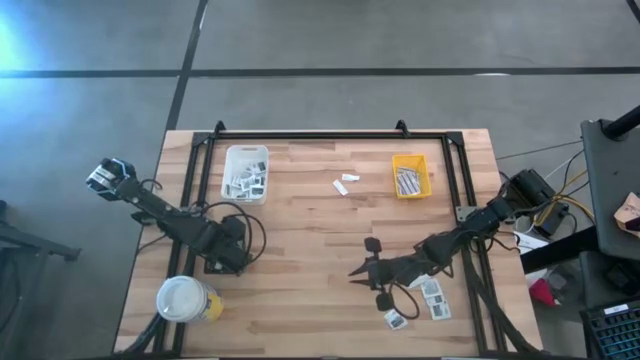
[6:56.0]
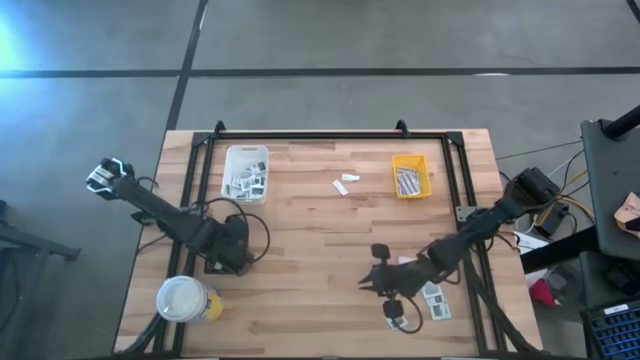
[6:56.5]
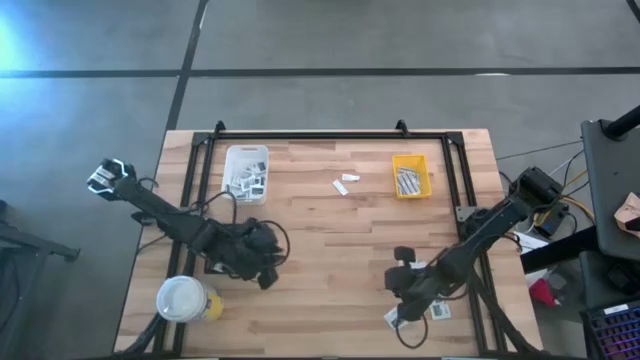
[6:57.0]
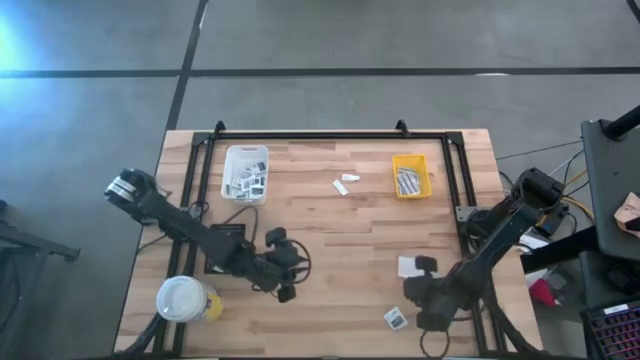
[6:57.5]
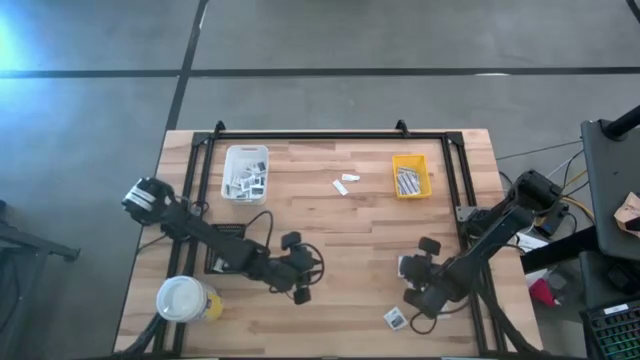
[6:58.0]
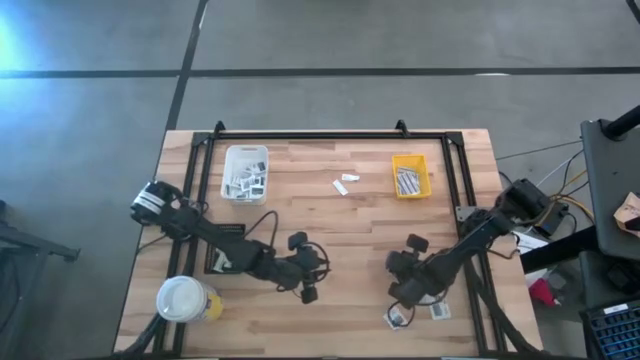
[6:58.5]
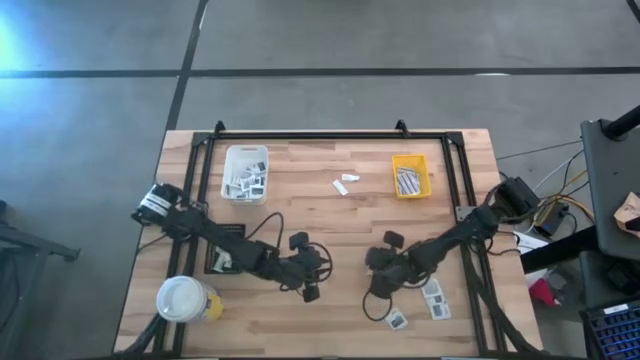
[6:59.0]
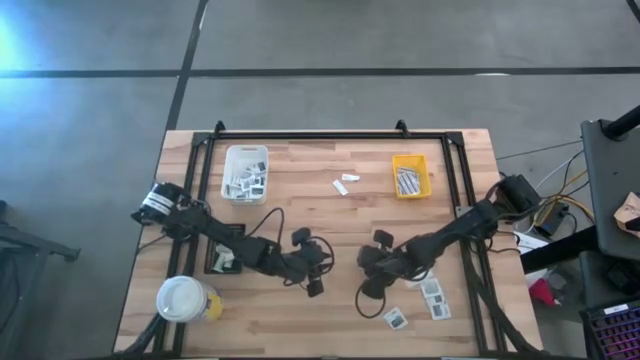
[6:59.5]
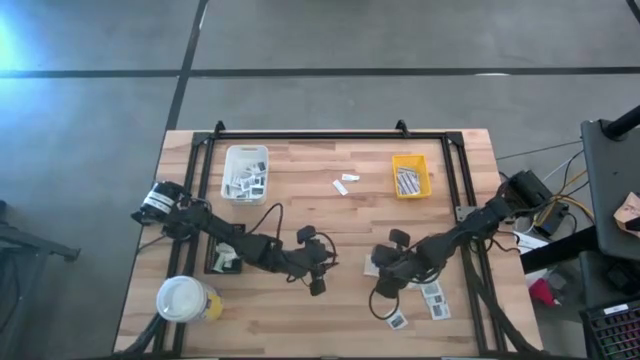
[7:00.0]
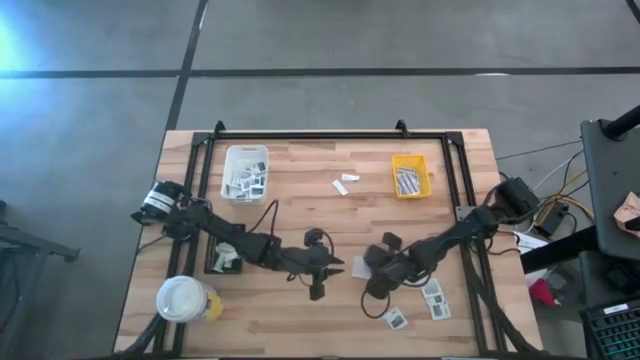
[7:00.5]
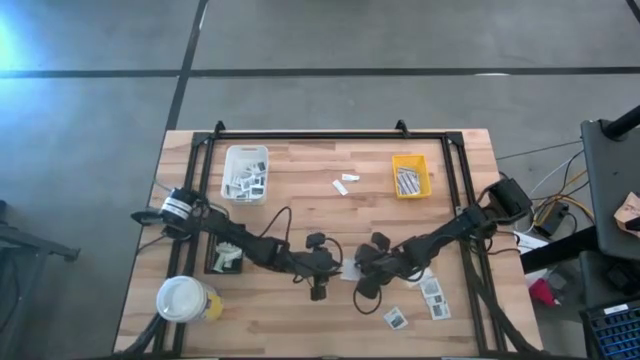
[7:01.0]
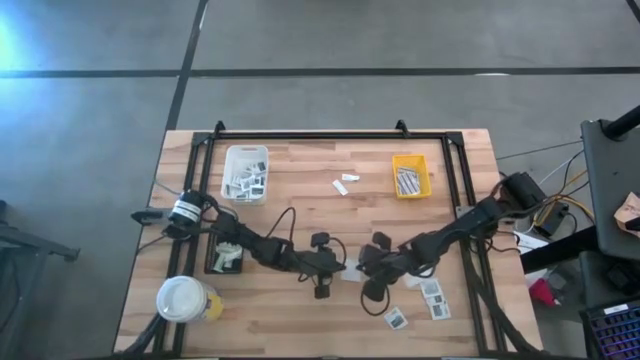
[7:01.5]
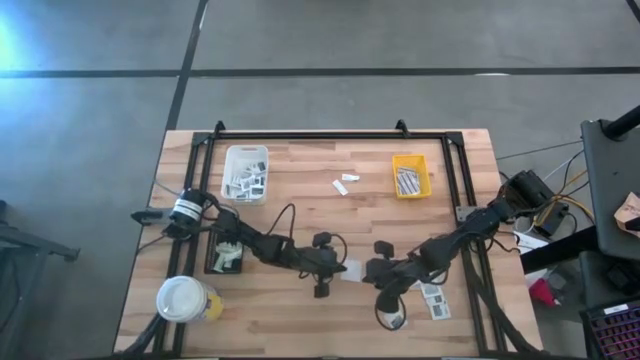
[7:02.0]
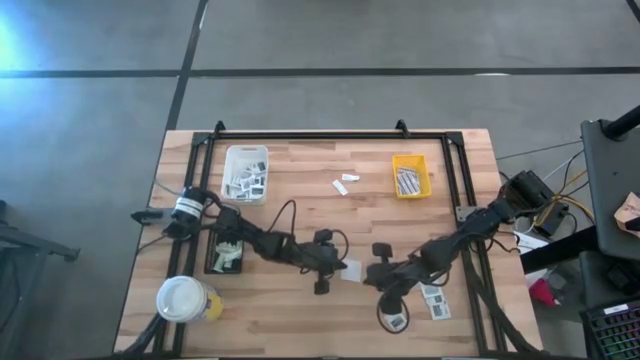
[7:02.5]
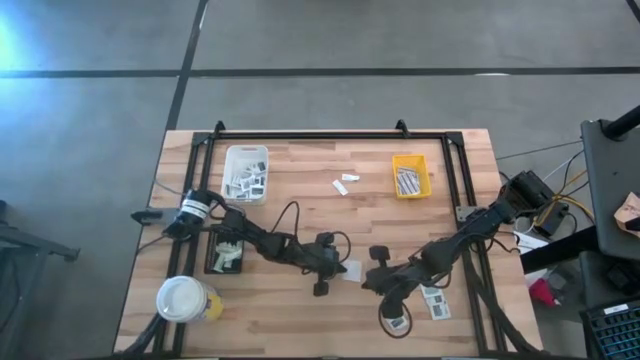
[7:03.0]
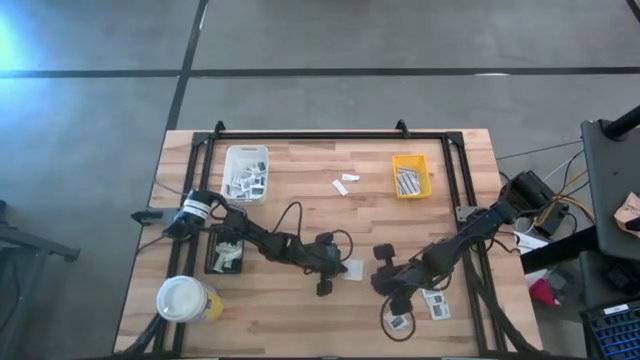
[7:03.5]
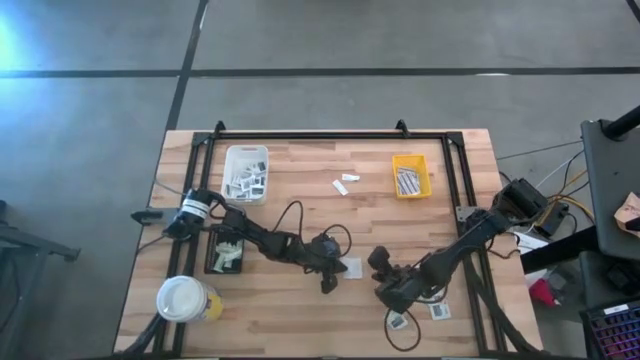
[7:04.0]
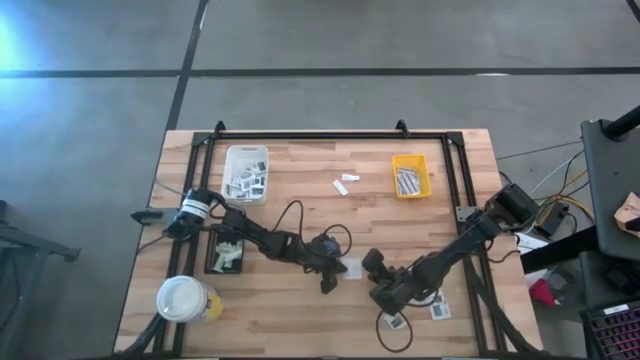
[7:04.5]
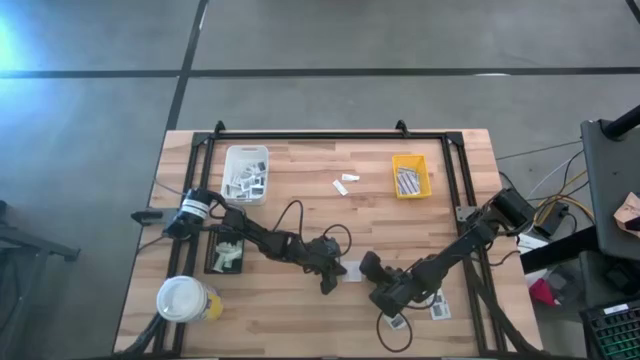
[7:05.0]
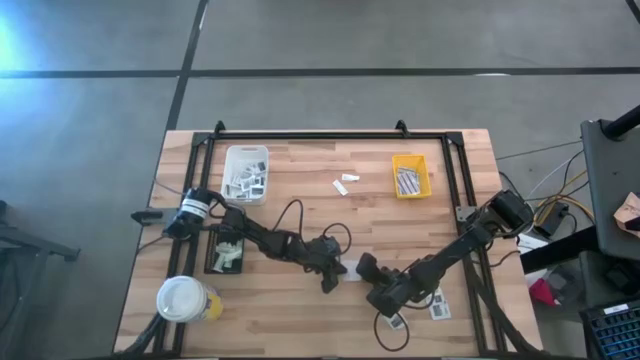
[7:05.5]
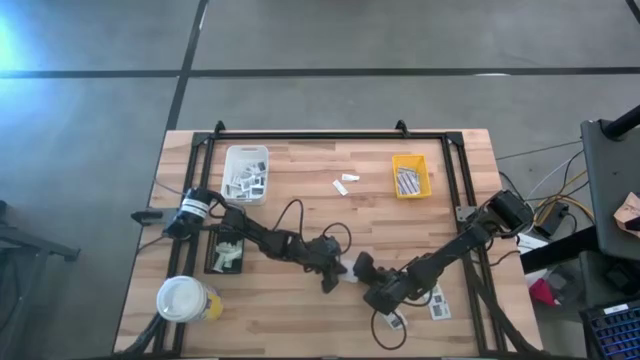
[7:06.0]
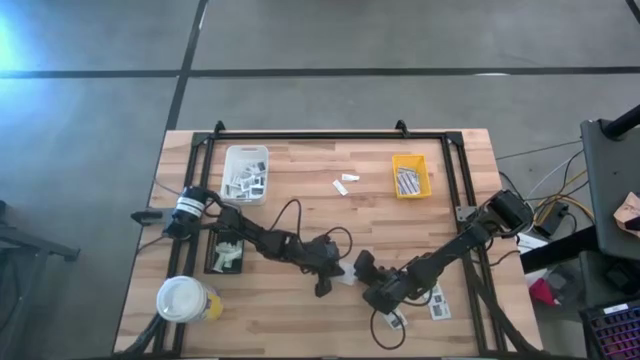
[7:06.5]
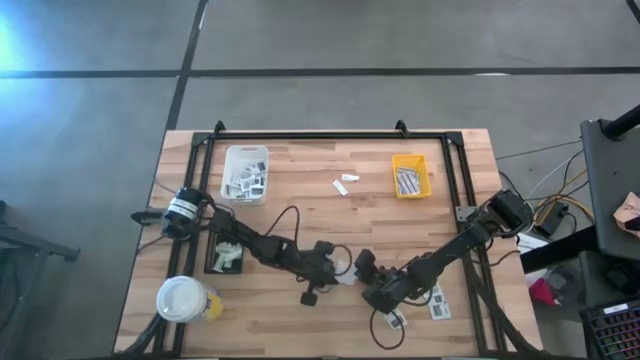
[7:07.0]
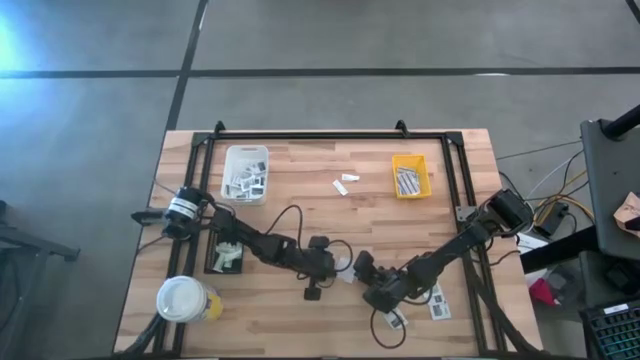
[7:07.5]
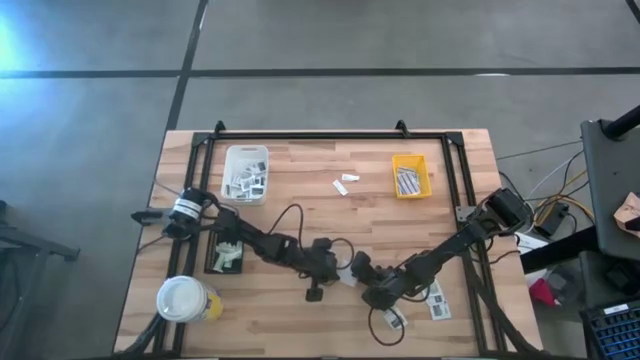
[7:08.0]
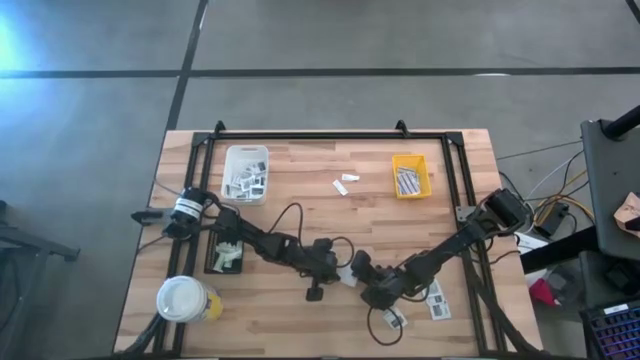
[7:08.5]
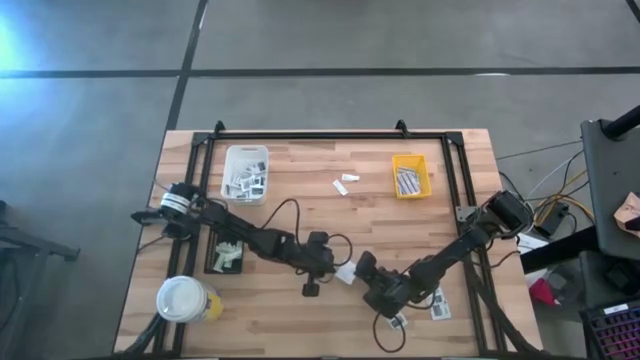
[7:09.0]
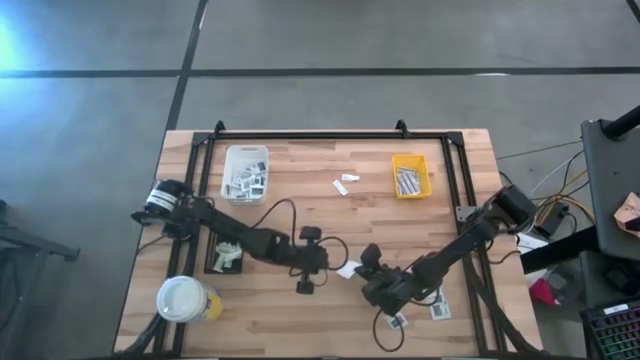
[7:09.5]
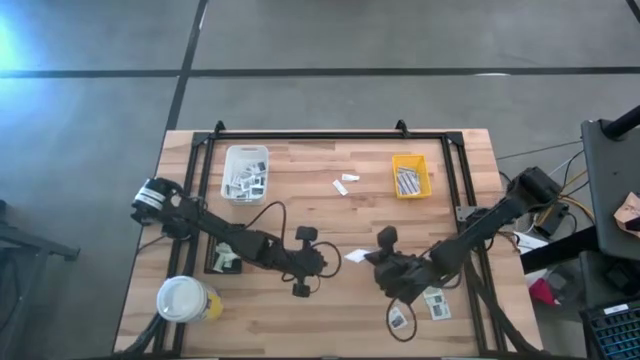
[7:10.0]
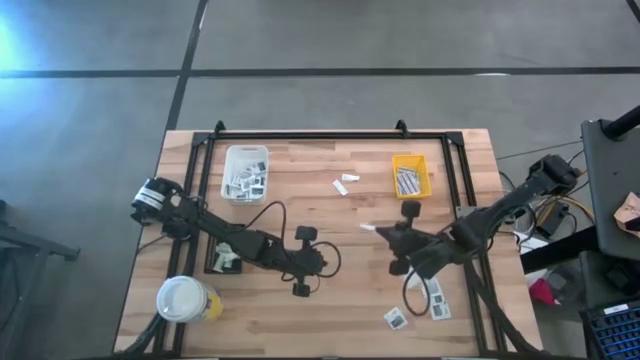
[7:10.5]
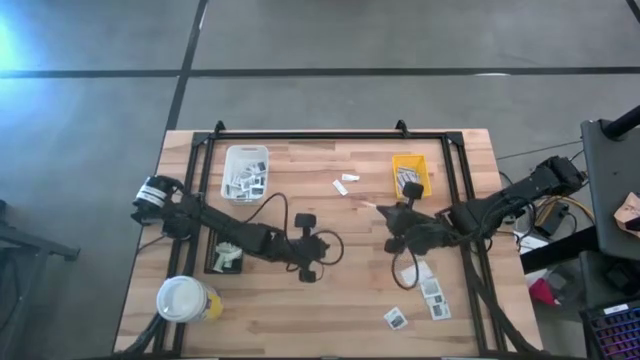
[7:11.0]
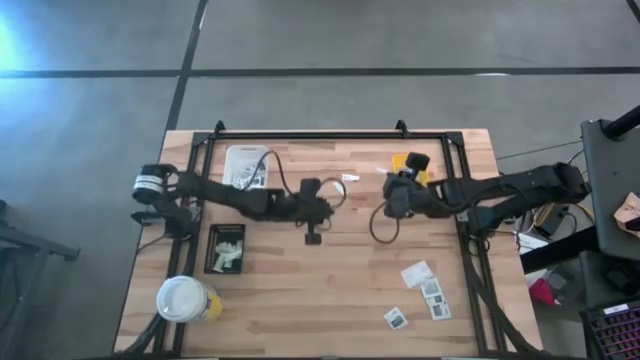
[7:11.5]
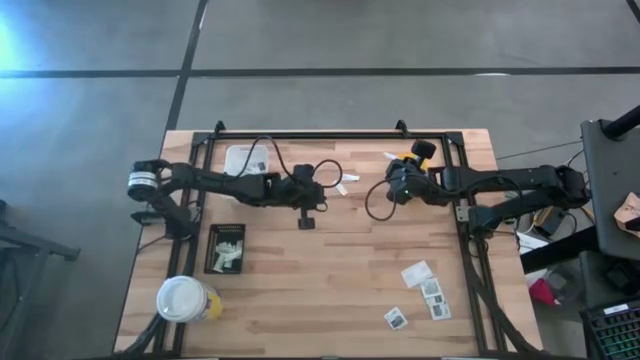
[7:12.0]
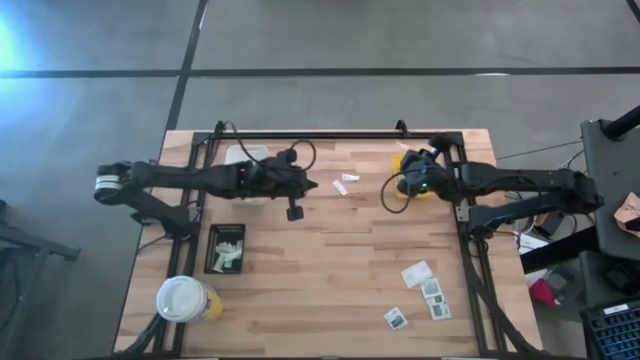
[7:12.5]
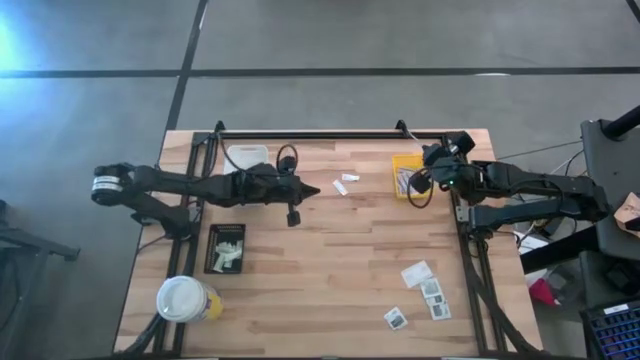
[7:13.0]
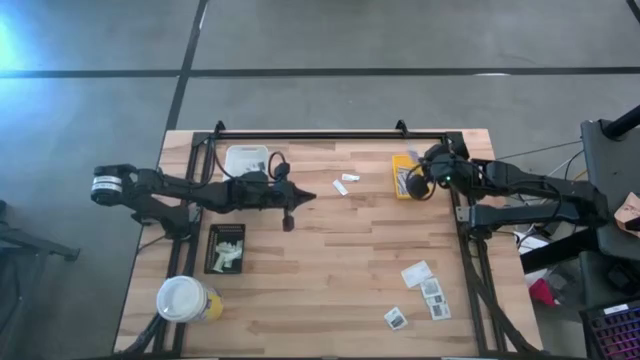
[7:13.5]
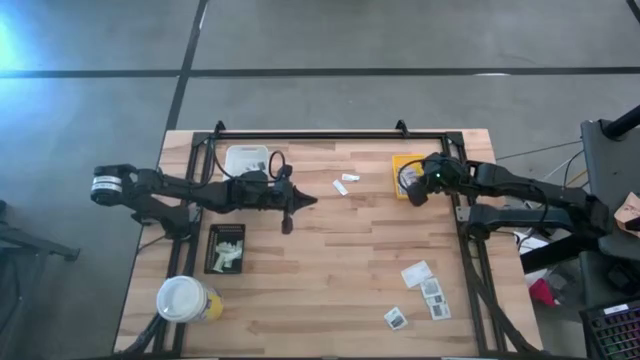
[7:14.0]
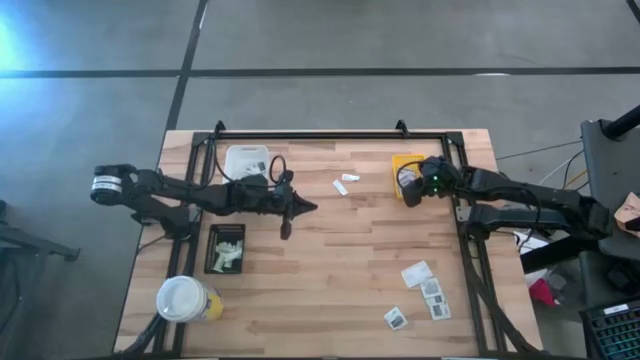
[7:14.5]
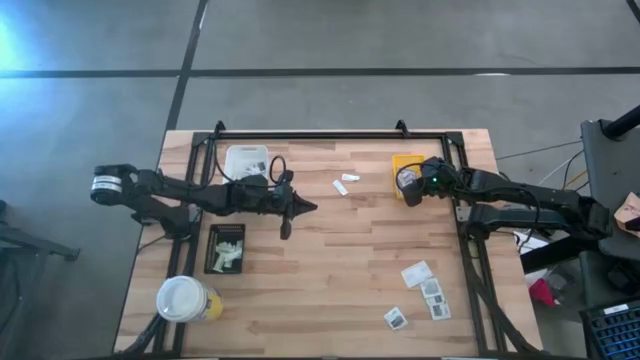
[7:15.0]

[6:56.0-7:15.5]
Task: Pick & Place First Aid Supplies
Put the blue bandage pack into the yellow bin

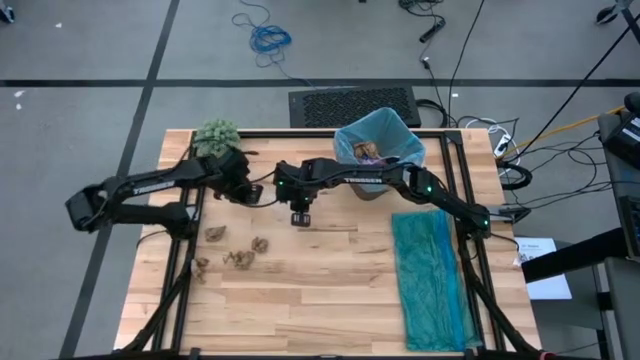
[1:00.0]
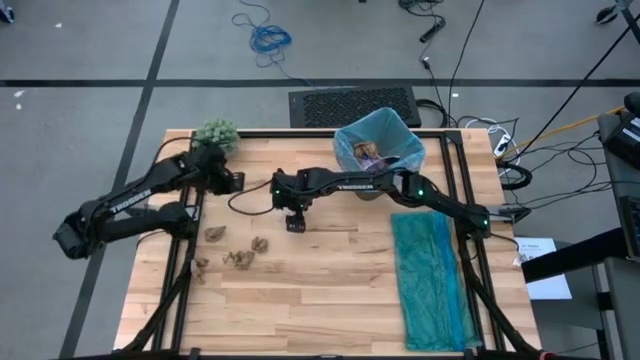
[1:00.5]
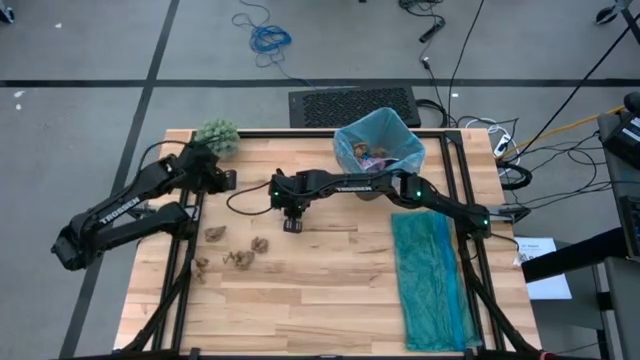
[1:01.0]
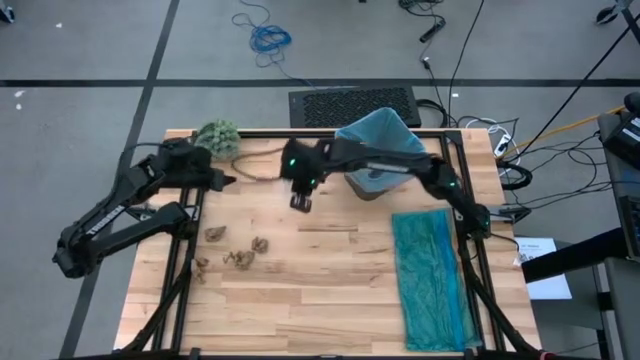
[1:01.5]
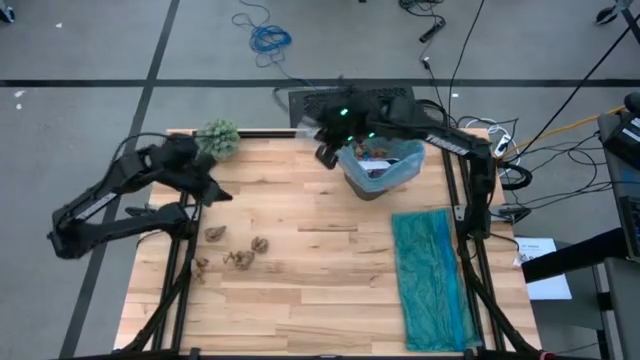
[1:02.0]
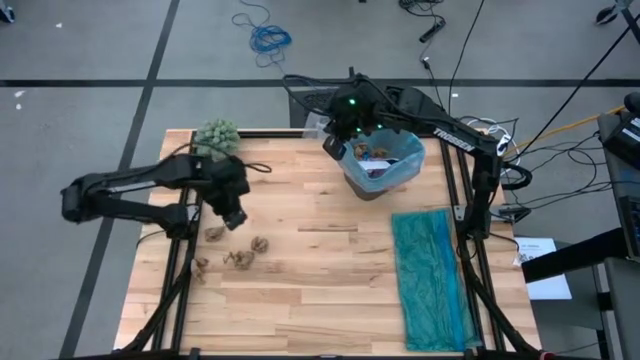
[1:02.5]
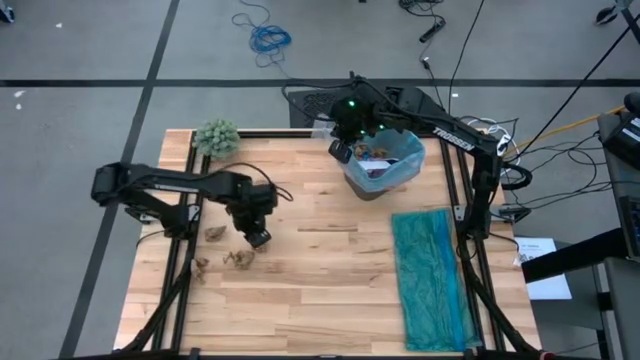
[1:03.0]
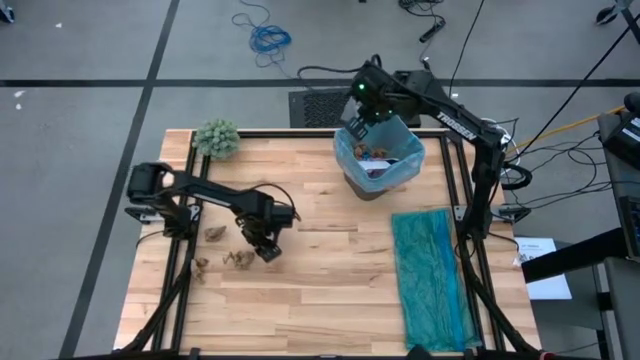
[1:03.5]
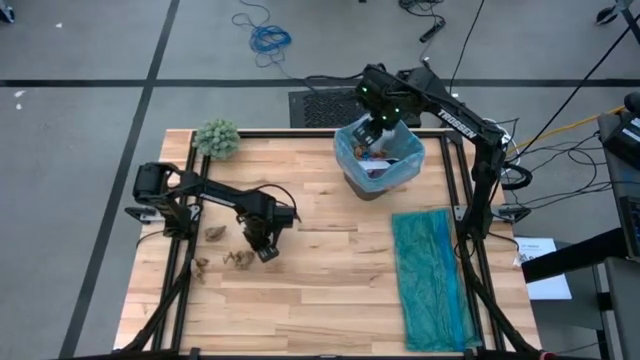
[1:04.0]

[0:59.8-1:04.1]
Task: place trash/remove bag and relplace
Put the transparent plastic into the trash bin
